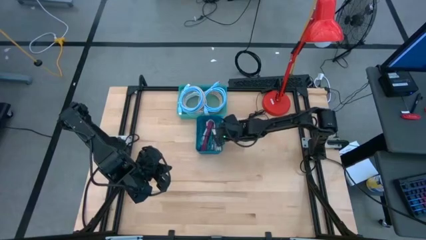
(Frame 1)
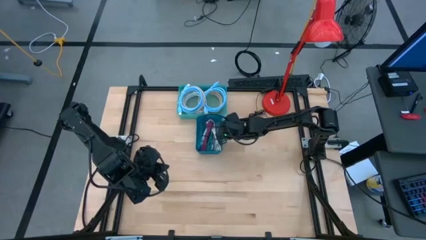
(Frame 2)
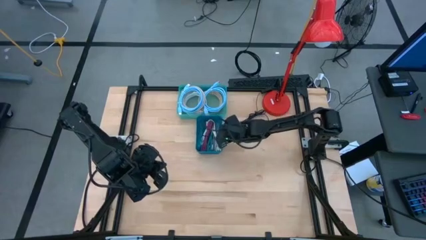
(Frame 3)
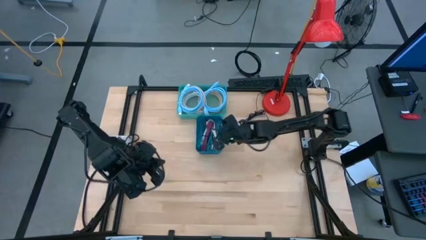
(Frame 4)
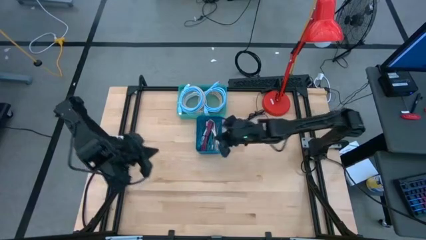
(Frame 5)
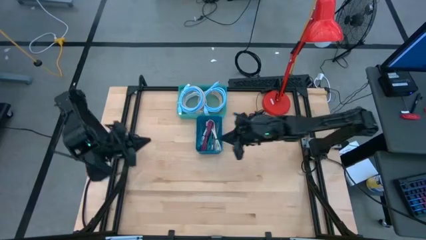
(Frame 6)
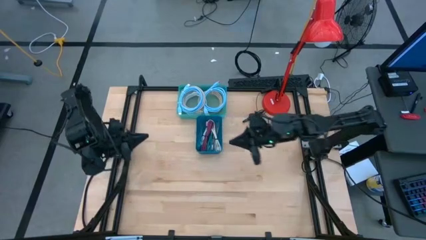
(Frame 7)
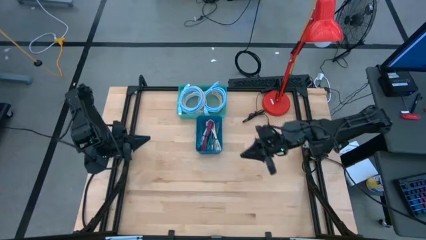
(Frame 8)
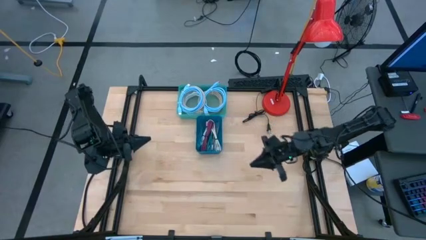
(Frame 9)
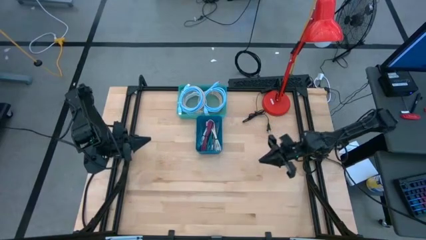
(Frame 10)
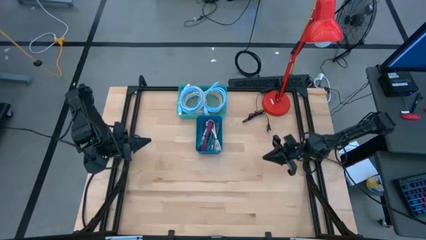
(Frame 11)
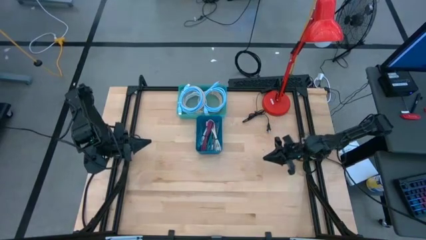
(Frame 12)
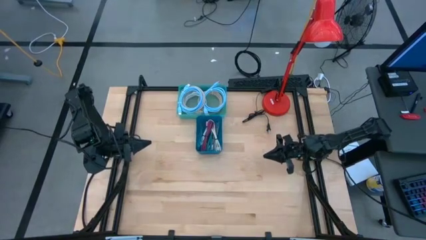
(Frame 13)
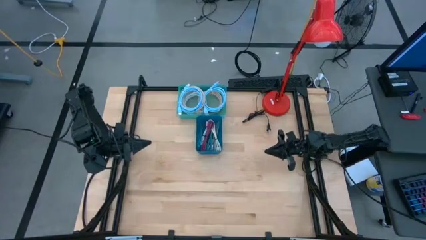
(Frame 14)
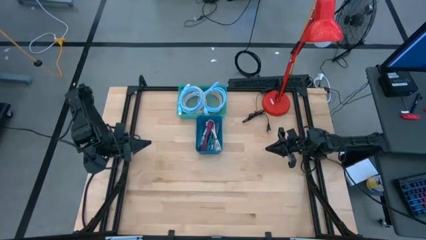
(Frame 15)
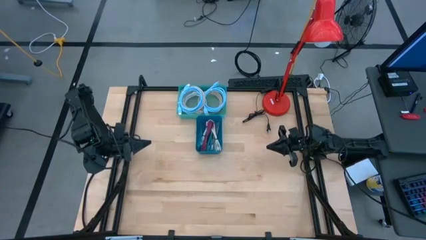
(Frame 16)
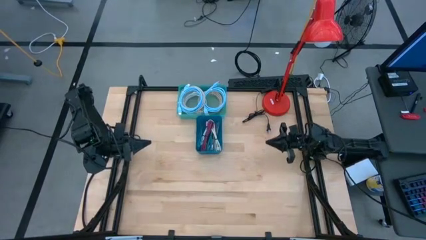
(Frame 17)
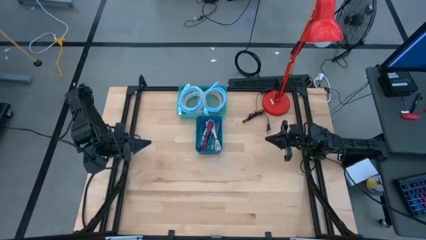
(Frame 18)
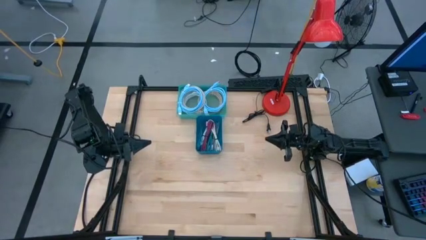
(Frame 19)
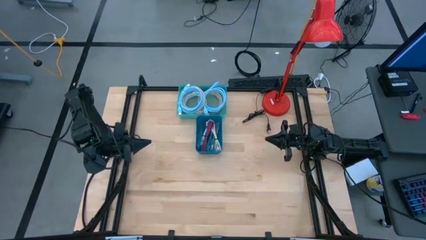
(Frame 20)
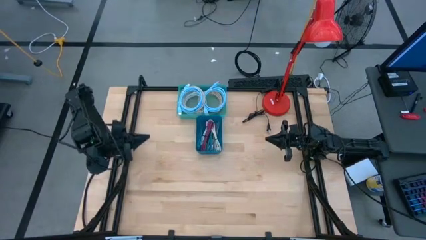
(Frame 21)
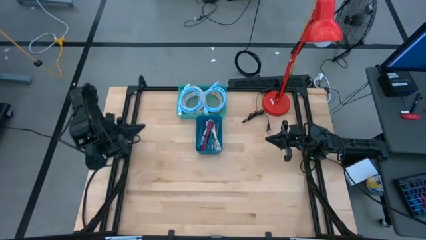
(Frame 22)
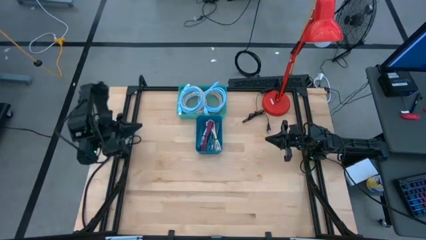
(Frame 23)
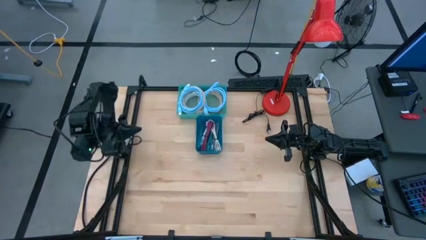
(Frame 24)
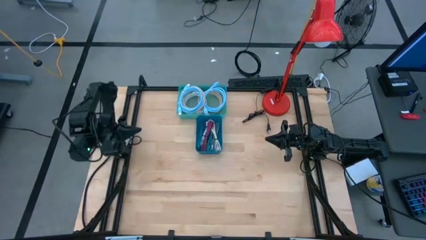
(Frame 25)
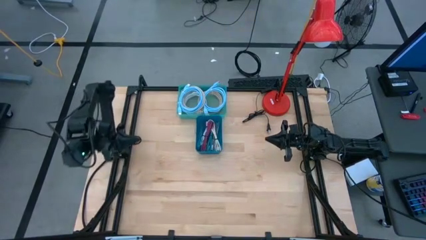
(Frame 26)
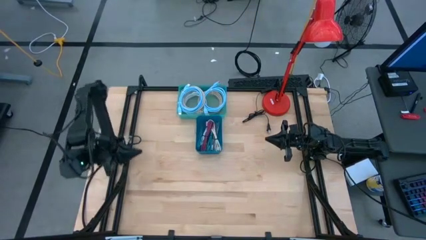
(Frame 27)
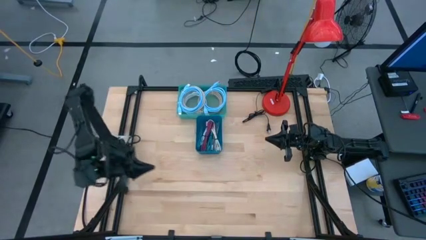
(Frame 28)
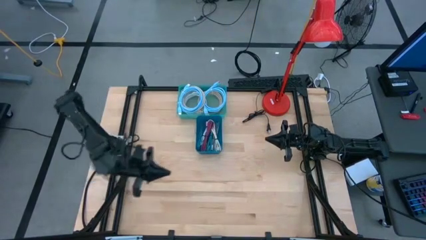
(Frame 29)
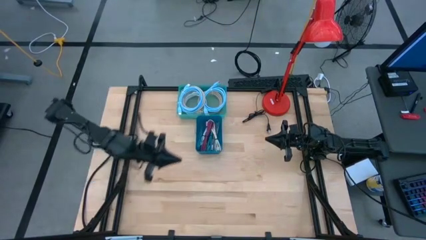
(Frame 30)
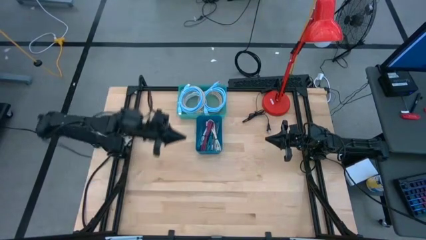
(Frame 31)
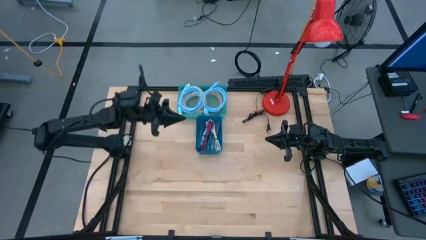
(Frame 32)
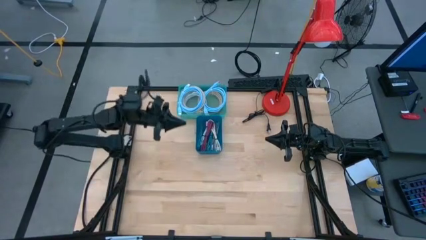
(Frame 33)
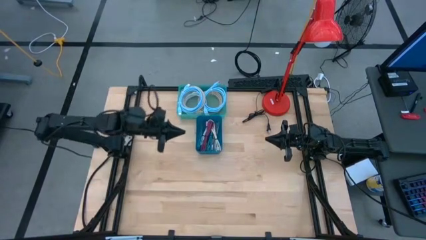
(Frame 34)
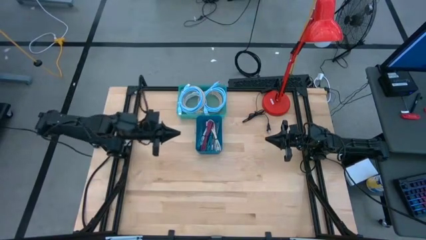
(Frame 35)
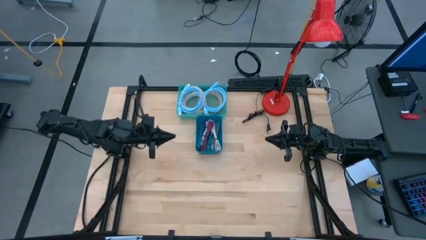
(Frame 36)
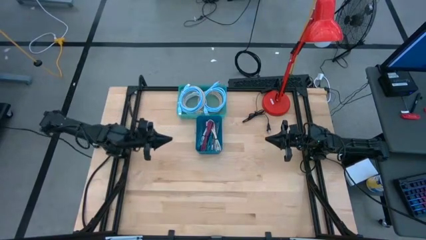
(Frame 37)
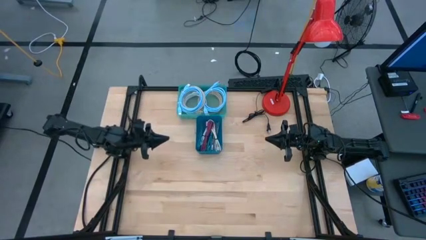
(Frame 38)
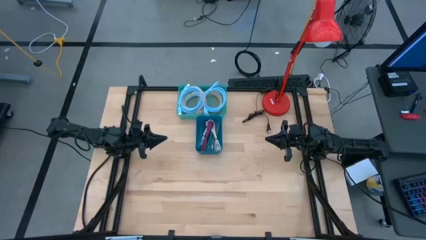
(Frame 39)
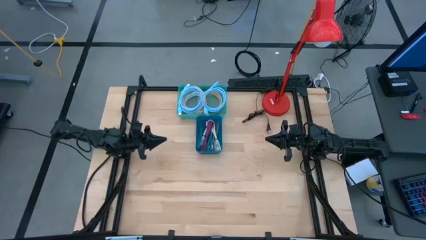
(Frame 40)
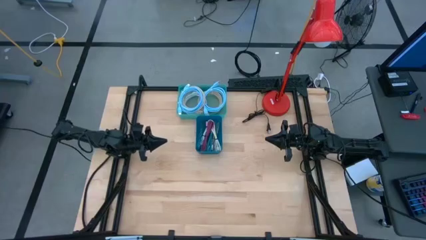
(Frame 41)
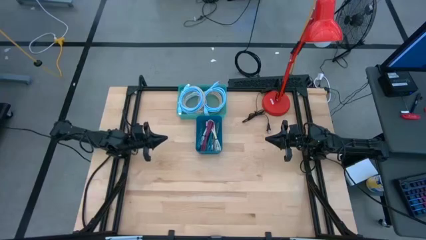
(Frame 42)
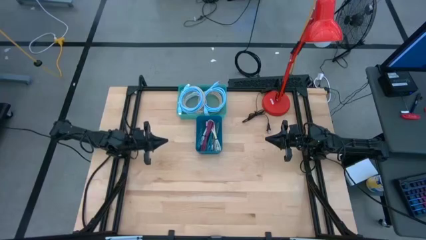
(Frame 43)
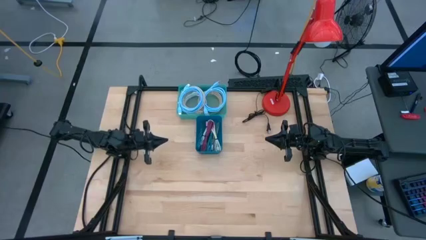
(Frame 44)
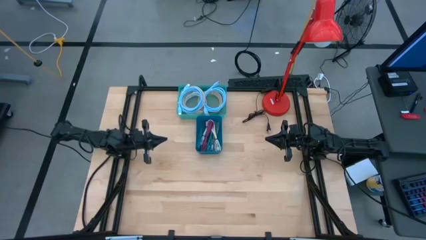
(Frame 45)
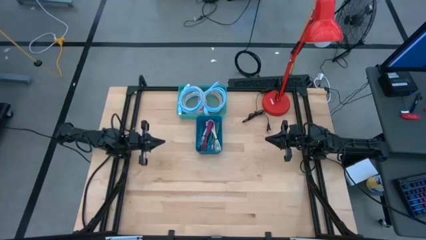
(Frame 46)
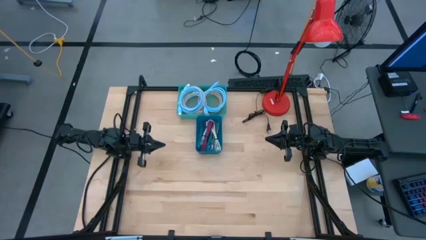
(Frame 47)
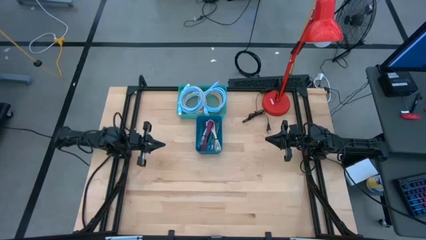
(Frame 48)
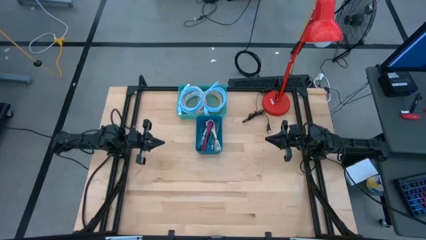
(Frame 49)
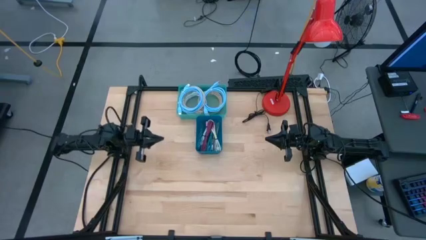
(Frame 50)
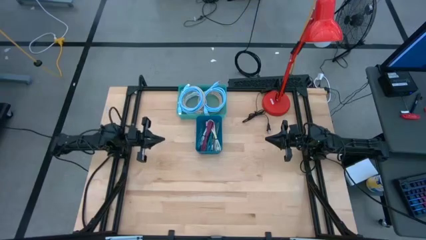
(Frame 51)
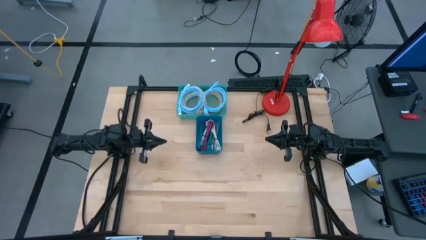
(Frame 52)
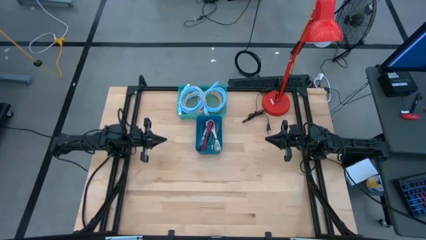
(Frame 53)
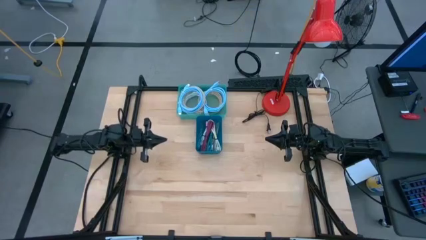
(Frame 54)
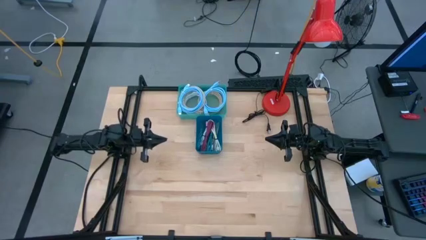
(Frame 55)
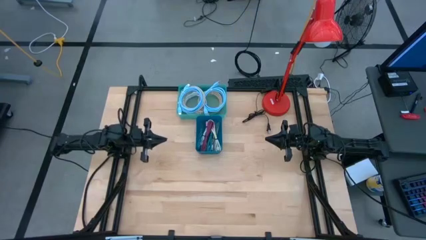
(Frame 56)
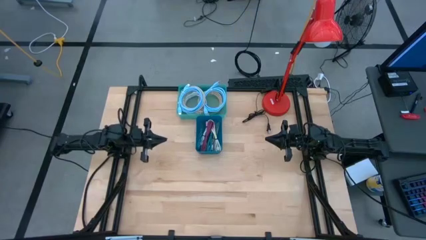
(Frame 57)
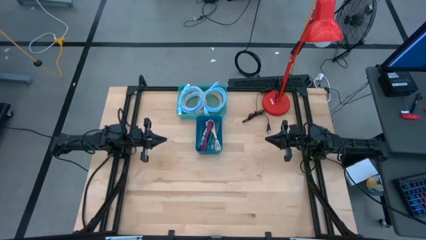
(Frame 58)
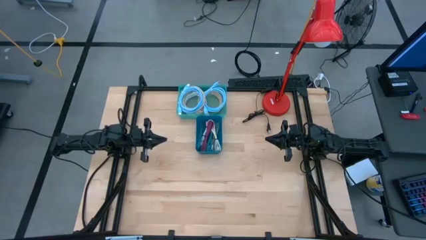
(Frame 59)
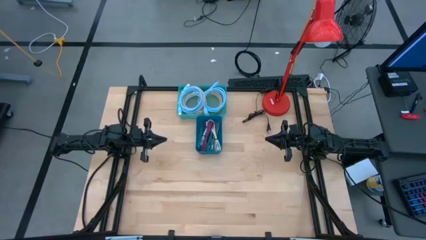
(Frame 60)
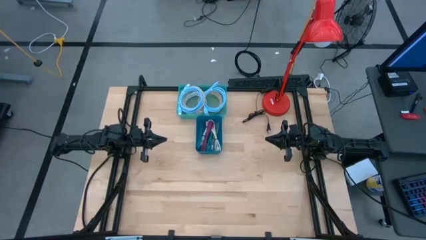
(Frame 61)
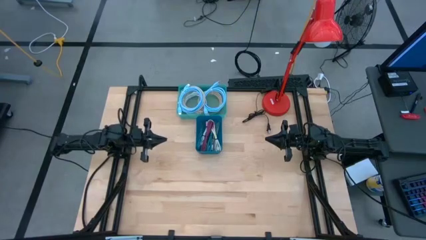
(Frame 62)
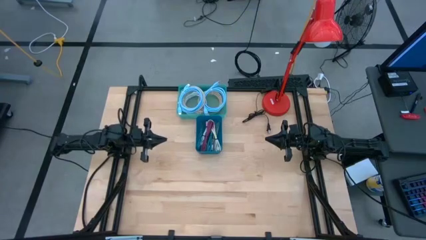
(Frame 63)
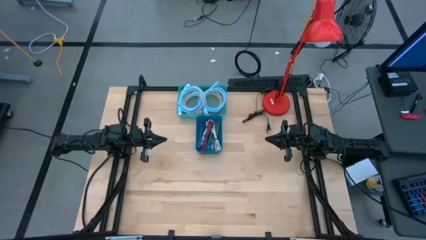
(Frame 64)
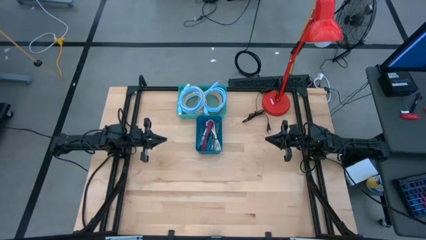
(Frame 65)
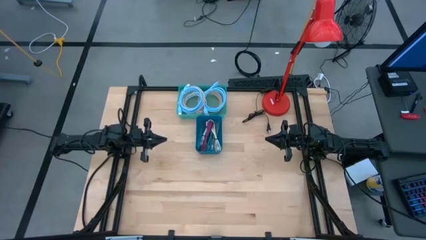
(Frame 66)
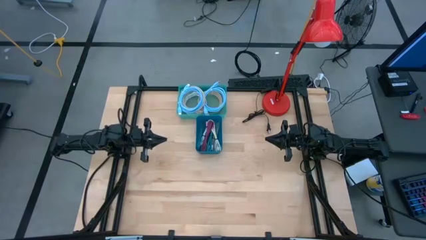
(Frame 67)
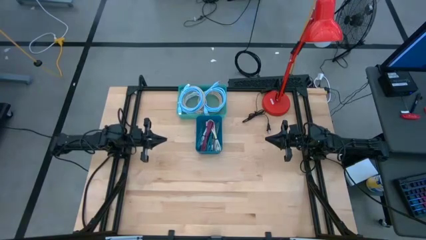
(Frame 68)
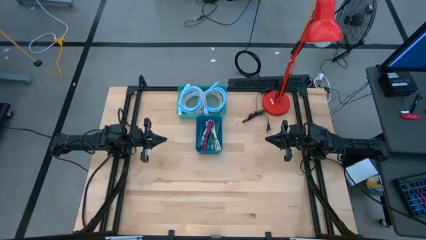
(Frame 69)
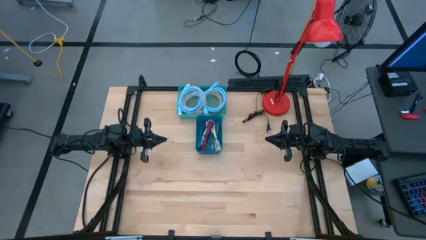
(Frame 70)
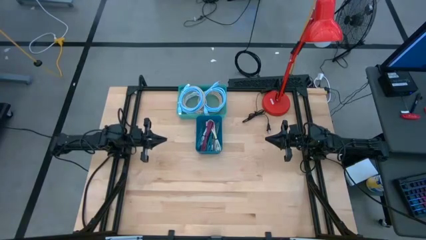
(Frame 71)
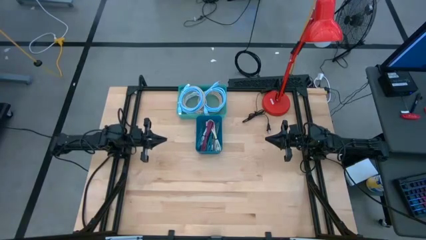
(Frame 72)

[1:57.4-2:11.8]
Task: Pick & Place USB Port
Return to Home Position

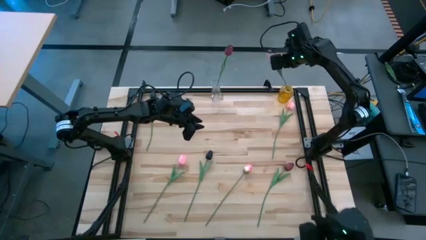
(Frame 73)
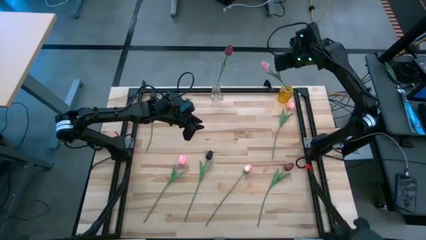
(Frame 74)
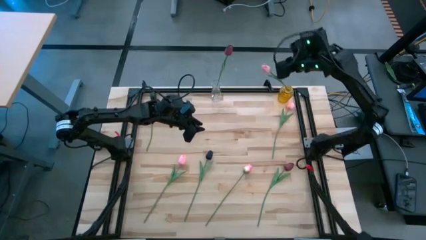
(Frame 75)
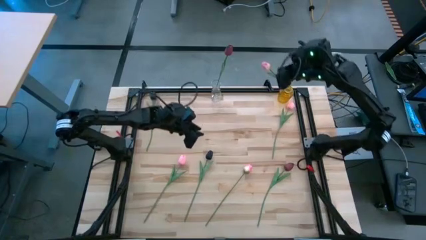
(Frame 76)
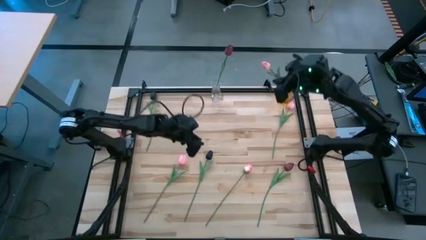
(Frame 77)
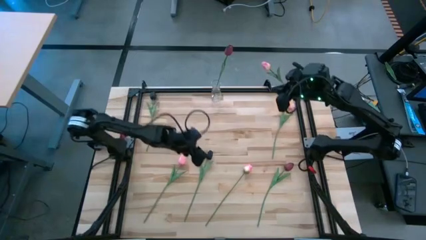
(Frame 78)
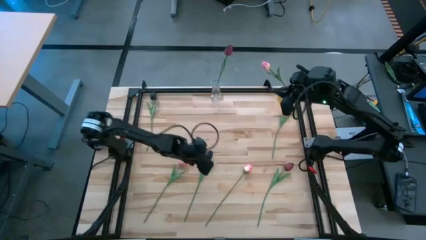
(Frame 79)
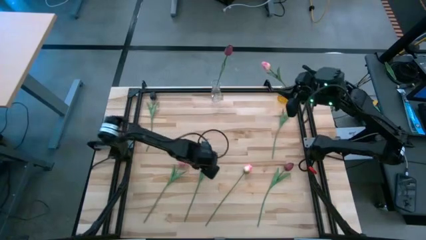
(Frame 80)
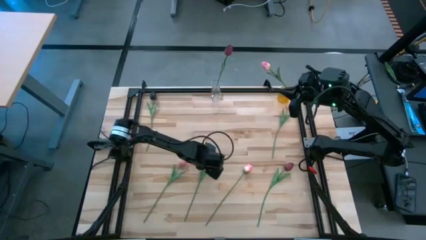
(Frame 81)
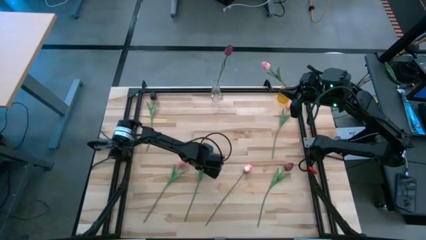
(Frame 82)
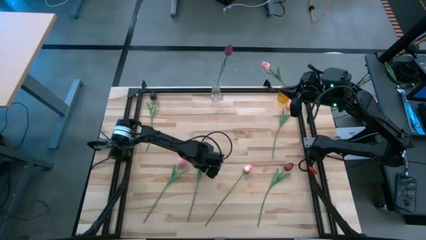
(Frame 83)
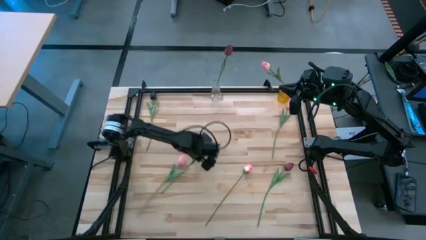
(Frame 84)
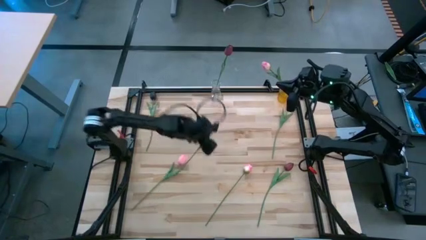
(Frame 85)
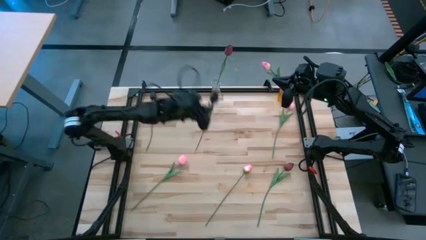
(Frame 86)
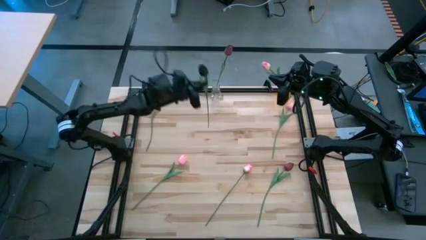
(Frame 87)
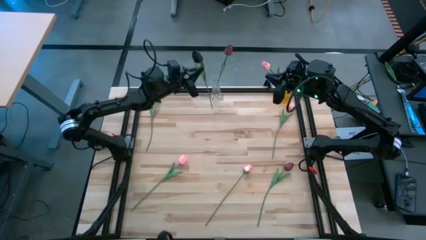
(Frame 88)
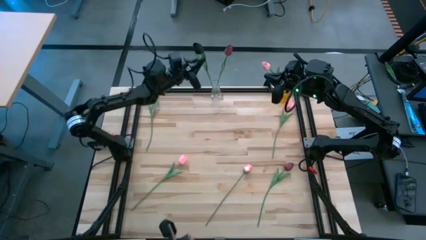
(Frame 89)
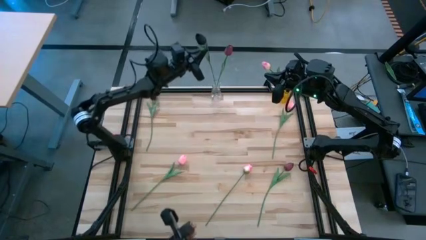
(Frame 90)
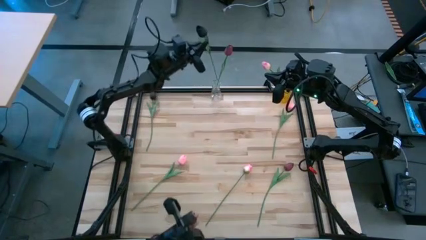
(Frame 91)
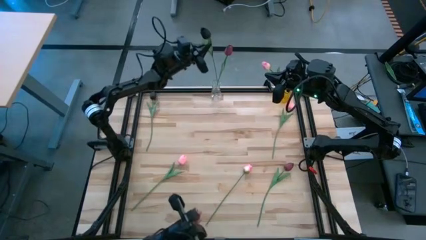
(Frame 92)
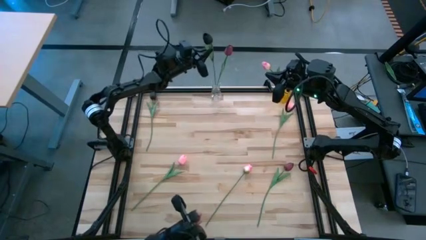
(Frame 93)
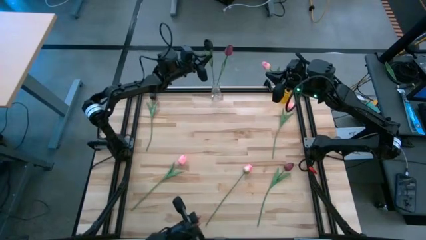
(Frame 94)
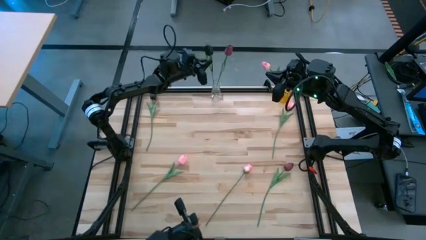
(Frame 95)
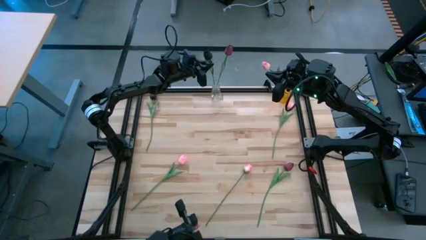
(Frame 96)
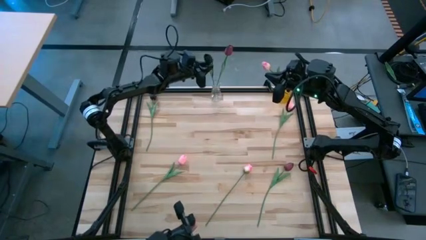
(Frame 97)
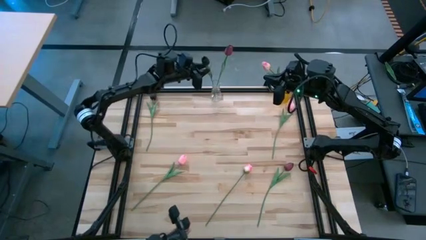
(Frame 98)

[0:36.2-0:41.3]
Task: Sort flowers into vase by color
Put the bottom black tulip into the crystal vase
